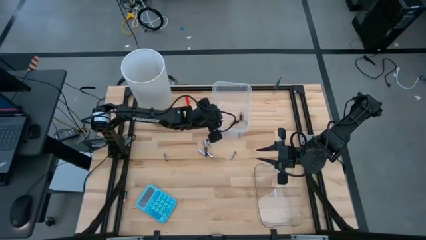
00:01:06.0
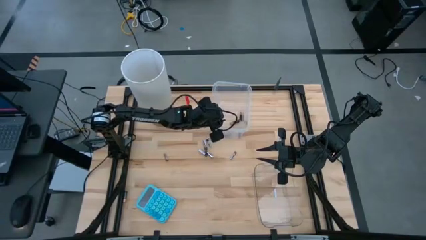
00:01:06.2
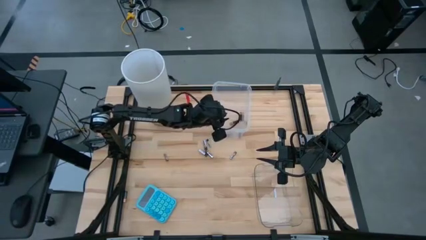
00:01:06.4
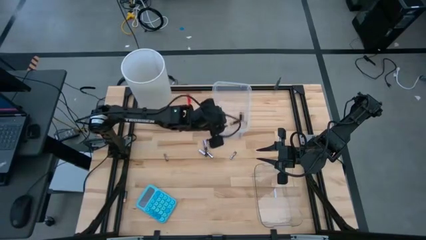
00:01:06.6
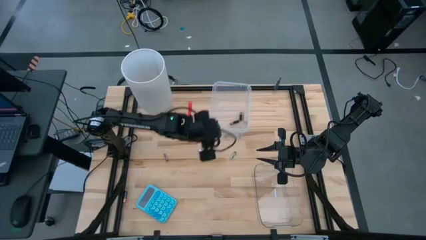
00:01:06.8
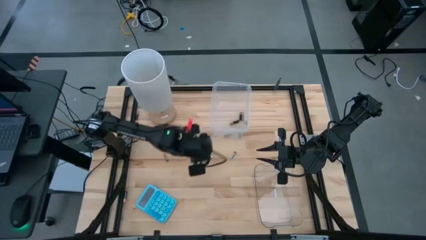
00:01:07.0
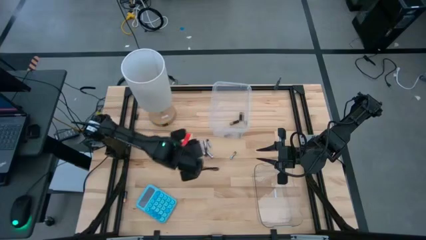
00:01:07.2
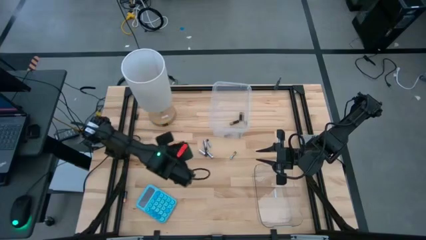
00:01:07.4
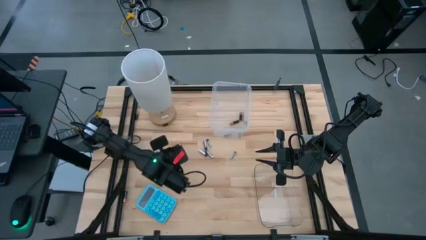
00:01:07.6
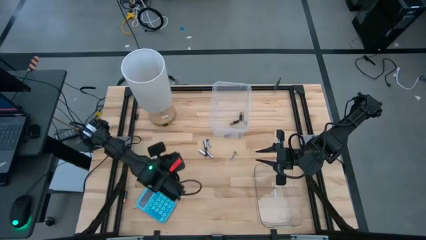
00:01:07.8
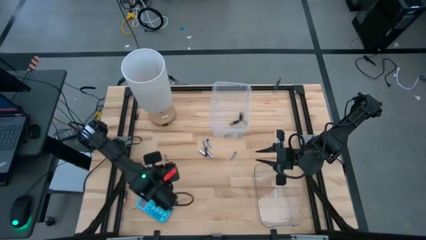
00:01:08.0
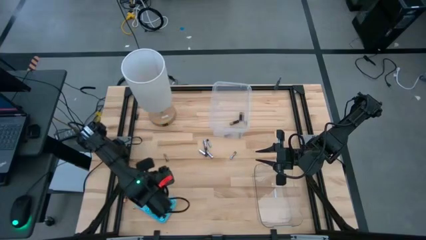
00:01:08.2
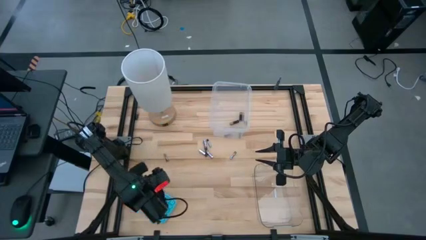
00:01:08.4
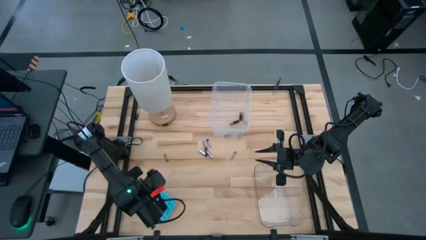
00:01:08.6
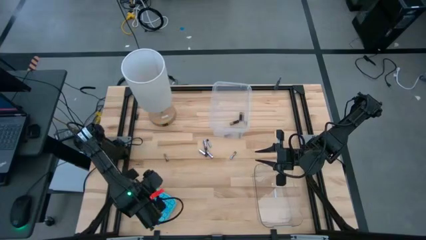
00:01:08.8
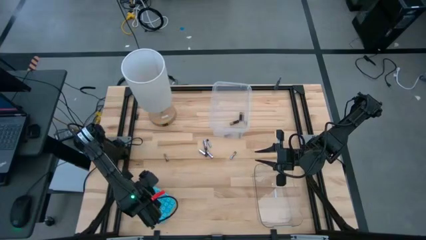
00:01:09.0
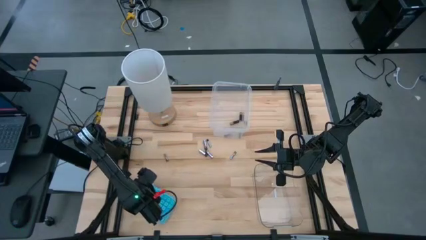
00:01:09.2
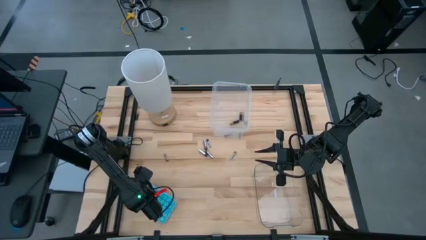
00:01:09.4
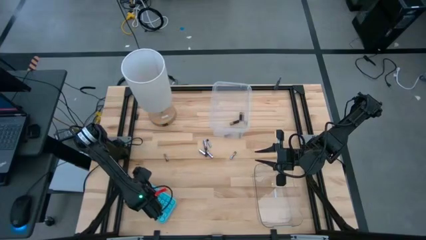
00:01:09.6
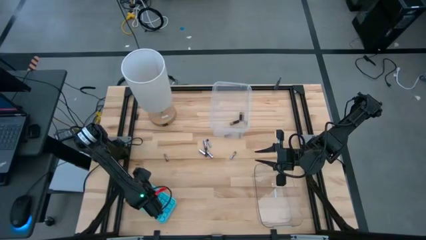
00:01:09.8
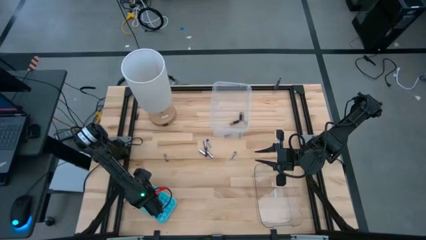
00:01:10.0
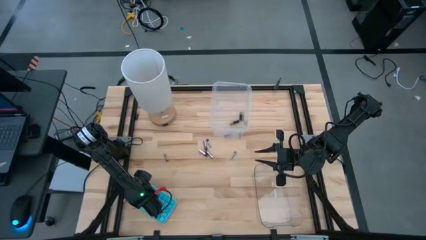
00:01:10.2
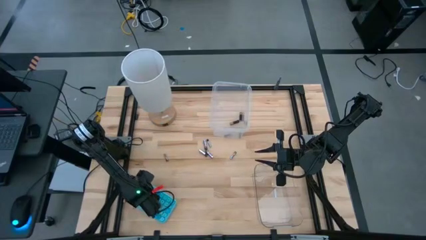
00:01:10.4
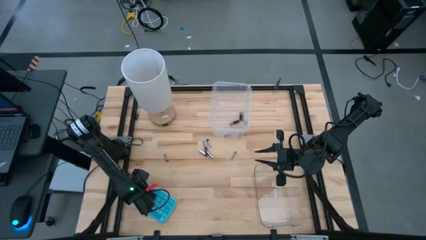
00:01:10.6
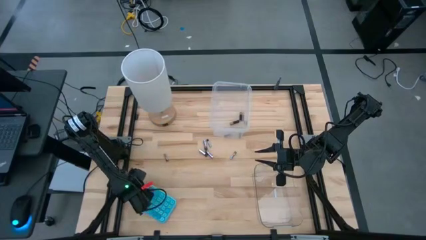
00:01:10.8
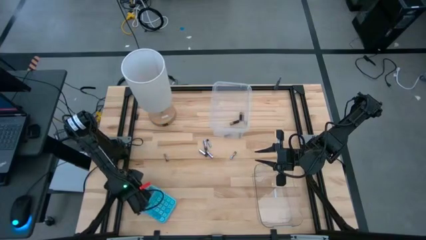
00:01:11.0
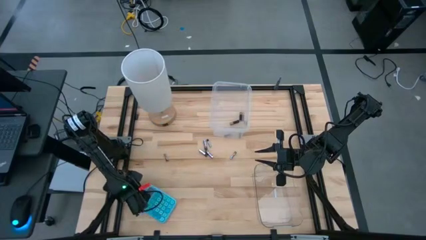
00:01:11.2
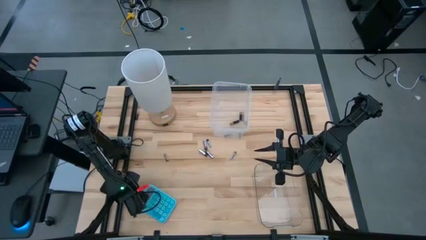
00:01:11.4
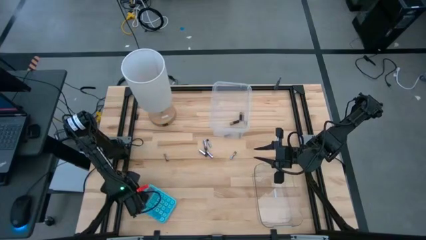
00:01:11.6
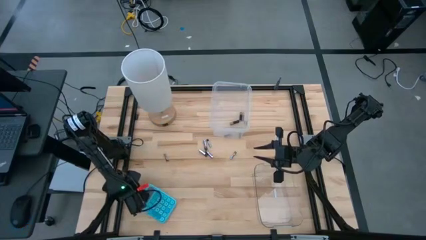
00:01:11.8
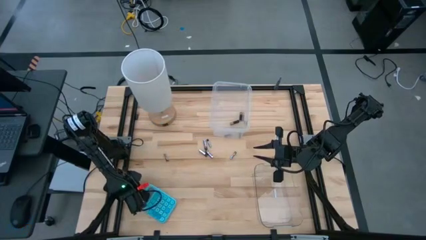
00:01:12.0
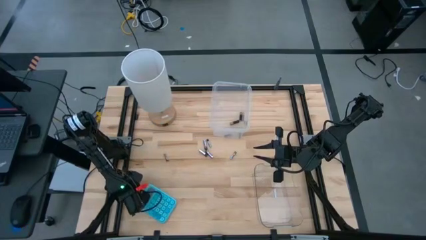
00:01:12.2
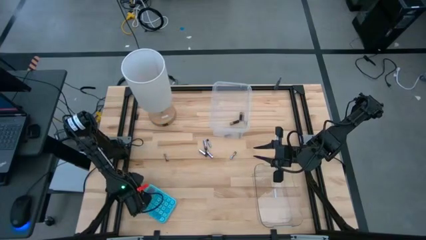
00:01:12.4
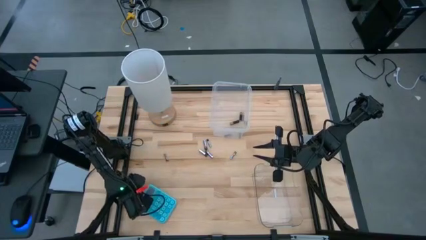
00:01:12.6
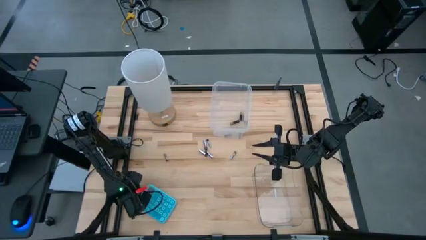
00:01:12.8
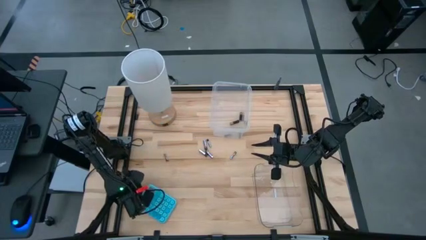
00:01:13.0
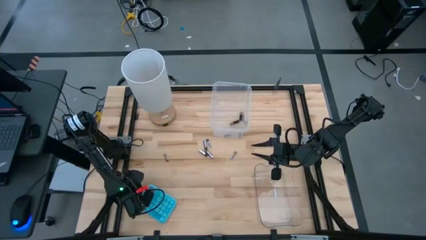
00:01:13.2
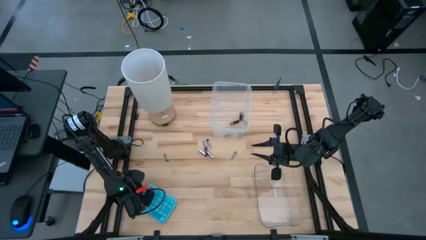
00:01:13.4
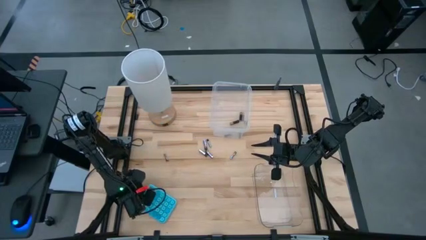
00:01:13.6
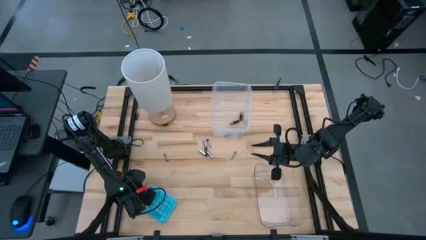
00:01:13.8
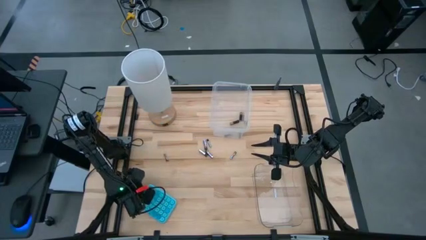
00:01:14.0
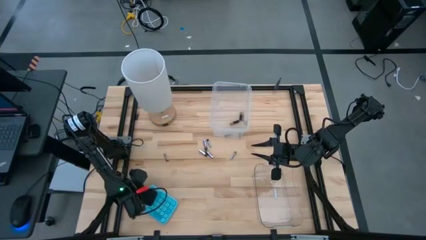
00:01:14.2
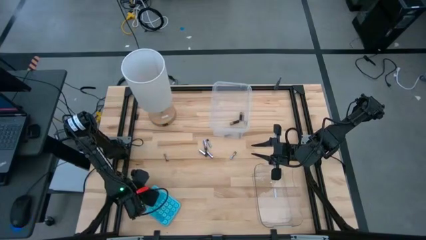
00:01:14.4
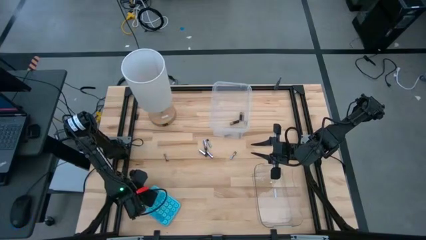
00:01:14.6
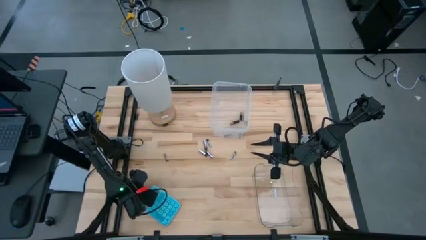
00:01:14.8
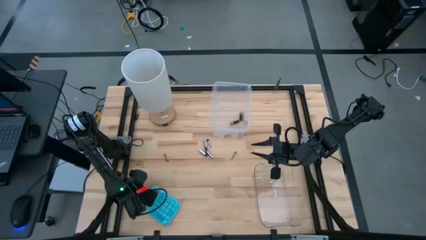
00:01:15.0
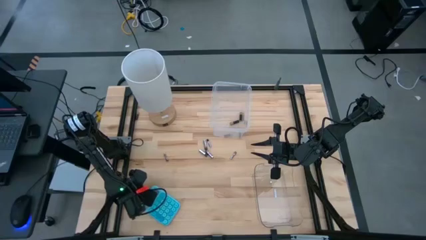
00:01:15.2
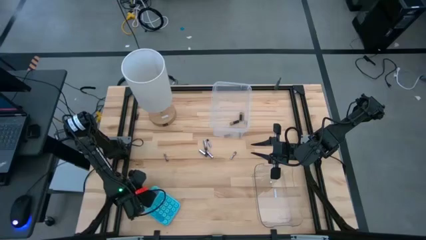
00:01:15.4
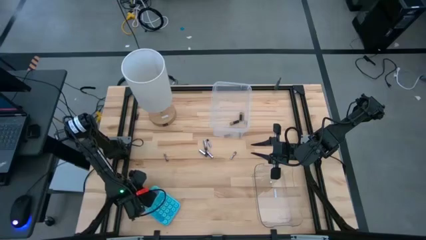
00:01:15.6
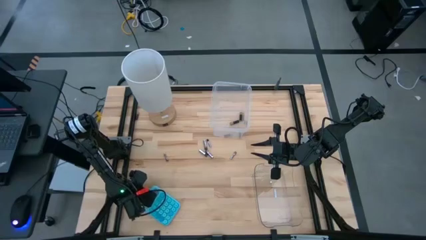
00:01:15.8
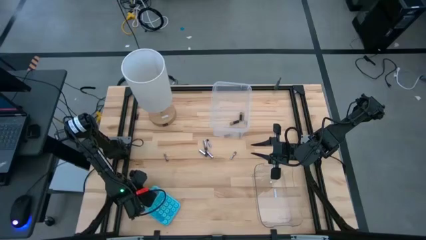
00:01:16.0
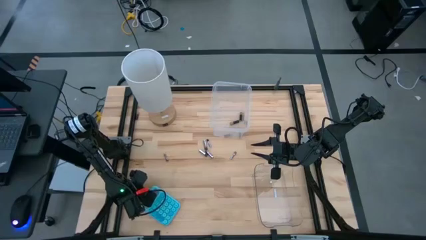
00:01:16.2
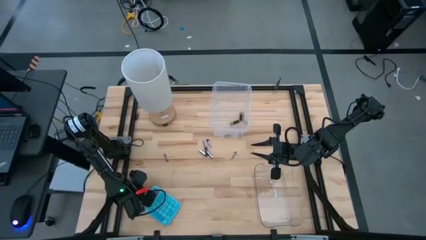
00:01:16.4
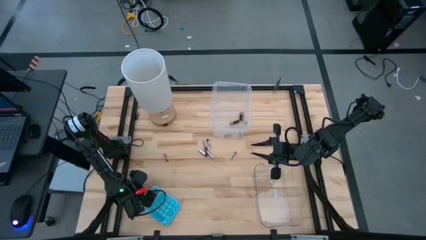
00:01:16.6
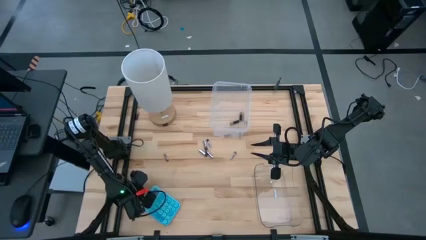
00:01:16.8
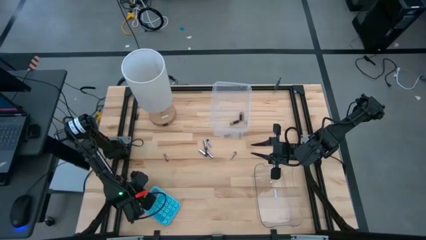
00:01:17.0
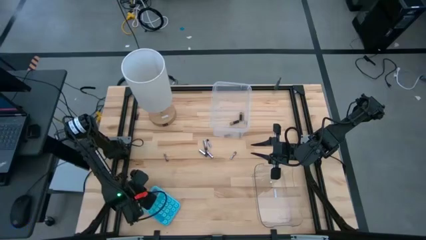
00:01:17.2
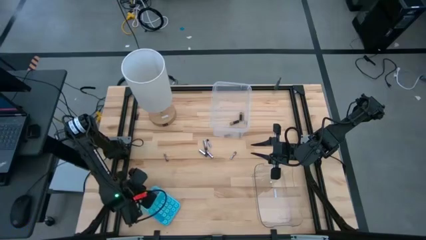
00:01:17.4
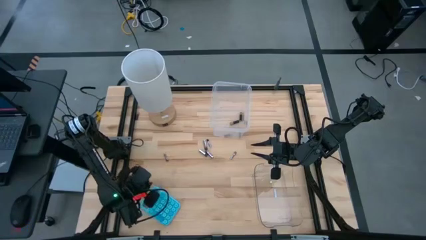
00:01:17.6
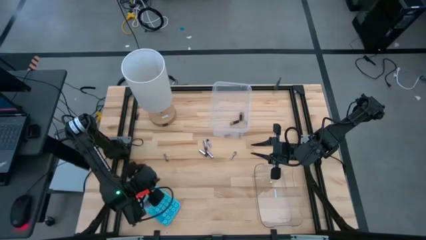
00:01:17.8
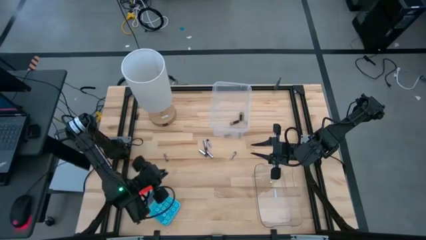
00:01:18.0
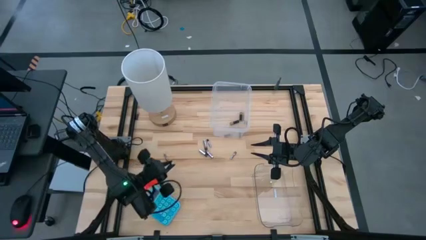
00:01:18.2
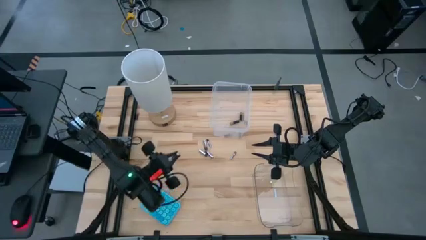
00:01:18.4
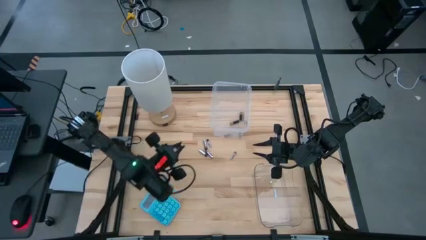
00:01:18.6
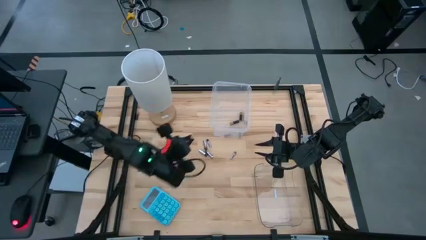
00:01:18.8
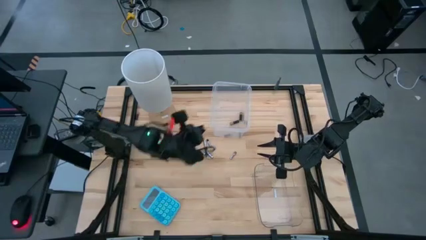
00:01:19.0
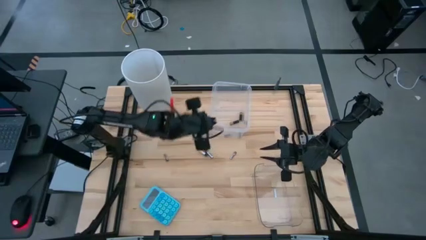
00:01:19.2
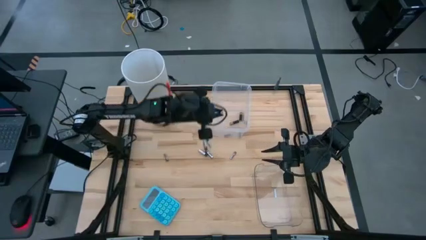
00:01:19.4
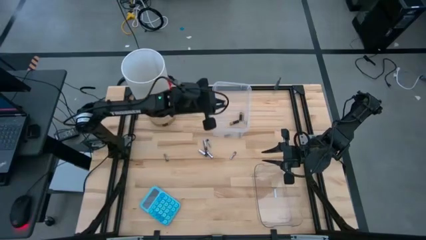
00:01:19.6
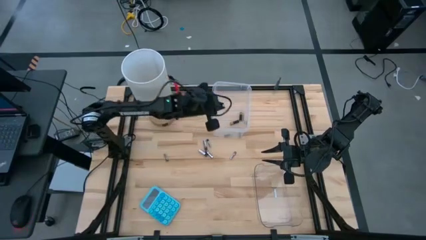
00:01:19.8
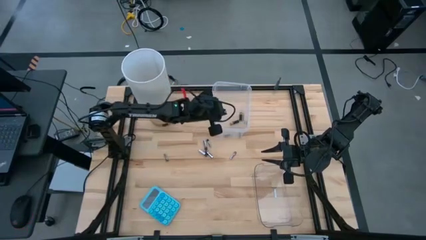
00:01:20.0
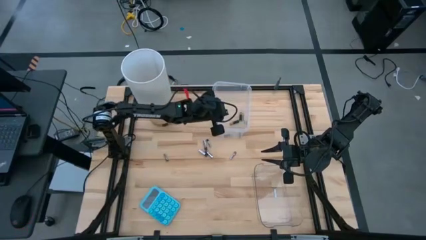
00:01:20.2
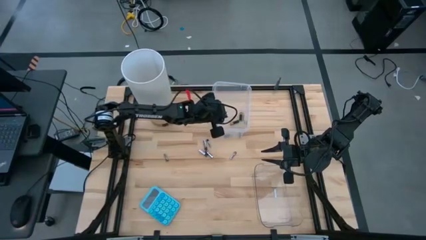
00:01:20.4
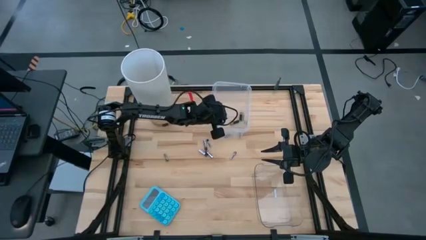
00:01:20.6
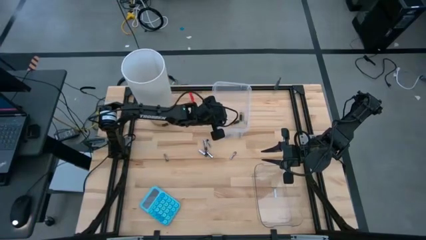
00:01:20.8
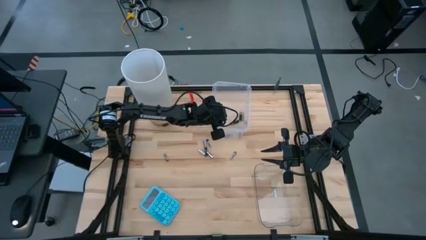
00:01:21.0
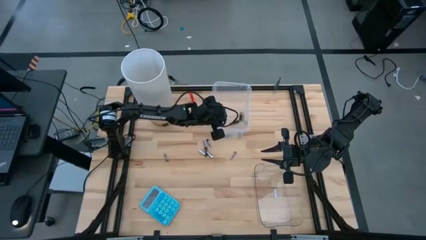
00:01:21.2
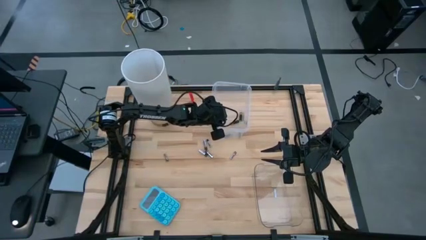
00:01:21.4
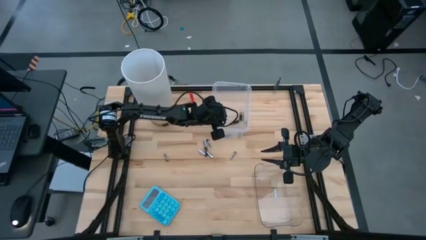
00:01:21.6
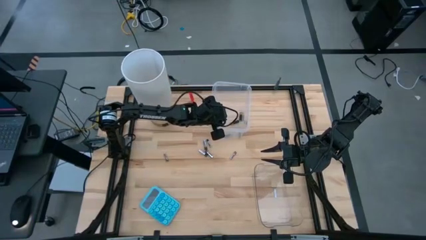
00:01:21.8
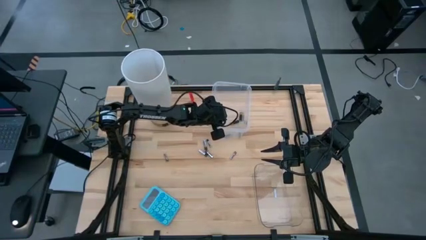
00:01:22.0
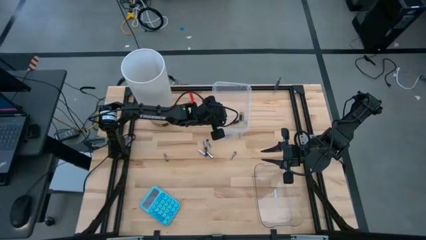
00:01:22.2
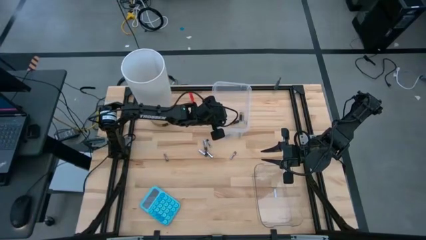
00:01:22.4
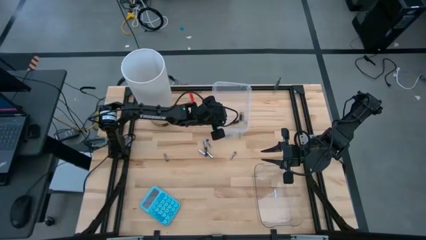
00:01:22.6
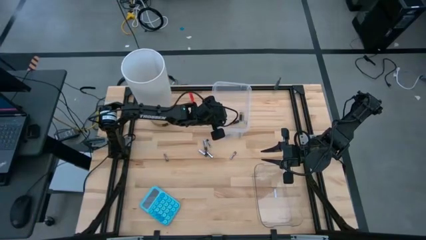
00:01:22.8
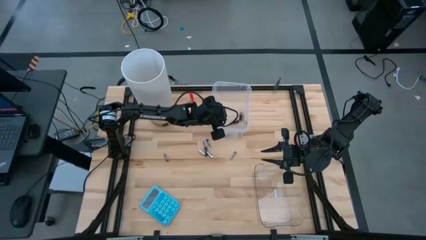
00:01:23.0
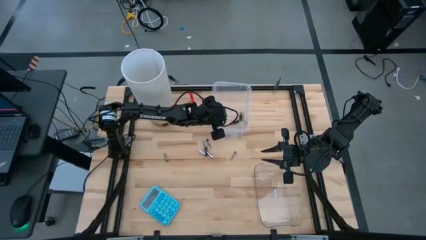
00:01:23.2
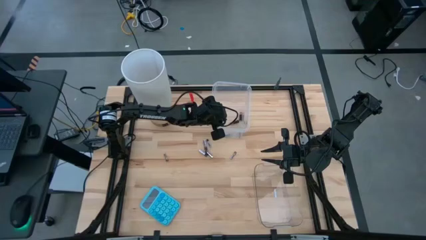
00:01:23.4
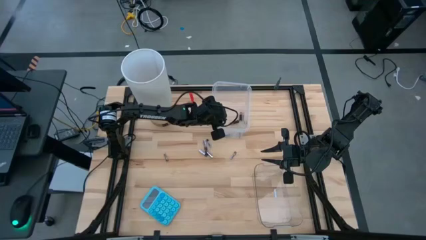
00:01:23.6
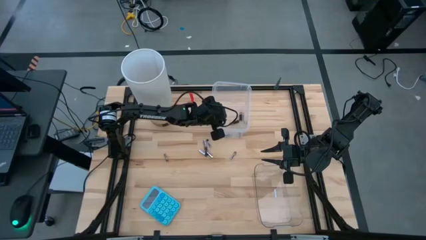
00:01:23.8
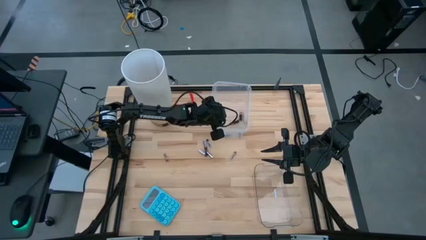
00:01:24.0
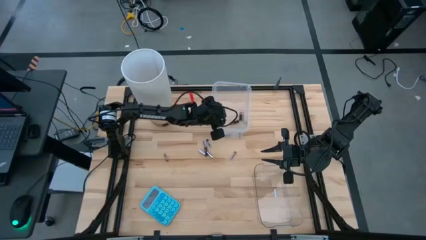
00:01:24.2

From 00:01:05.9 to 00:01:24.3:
Task: Sort batteries
Put the brown battery into the top transparent bin
